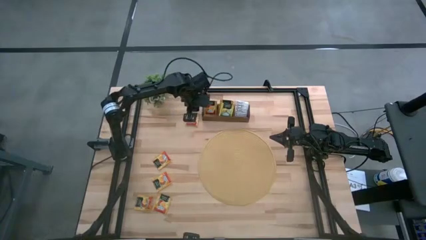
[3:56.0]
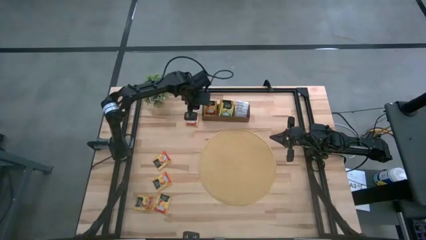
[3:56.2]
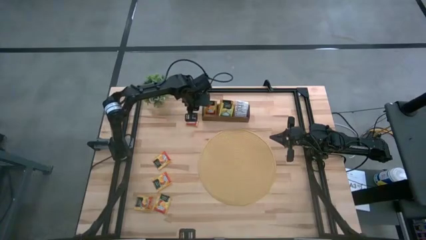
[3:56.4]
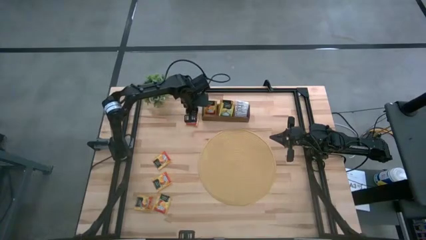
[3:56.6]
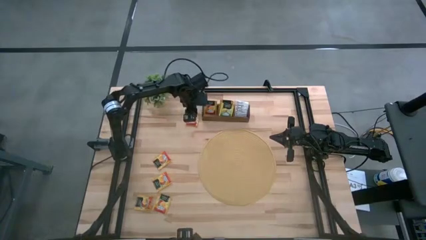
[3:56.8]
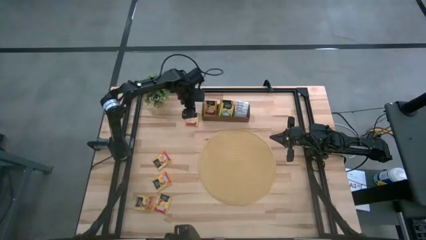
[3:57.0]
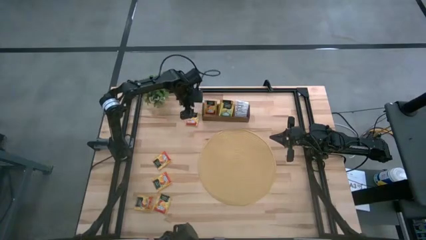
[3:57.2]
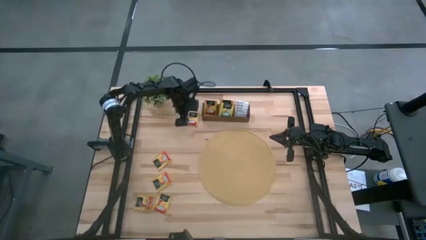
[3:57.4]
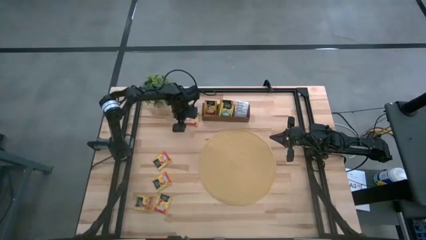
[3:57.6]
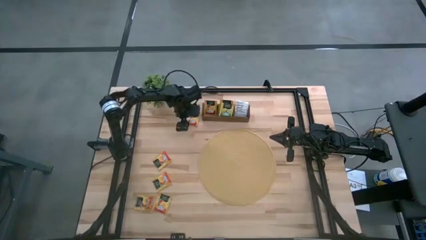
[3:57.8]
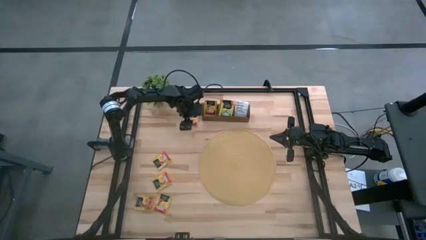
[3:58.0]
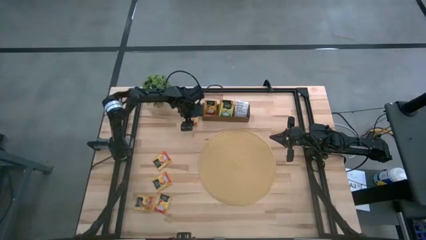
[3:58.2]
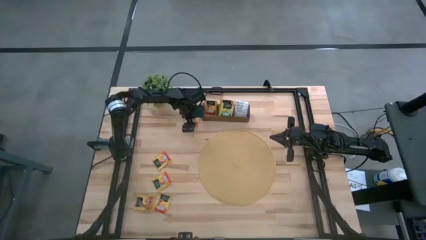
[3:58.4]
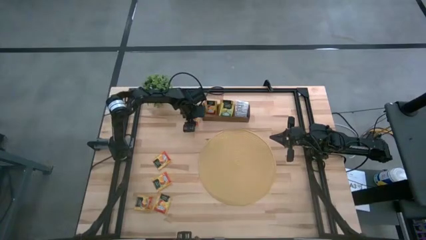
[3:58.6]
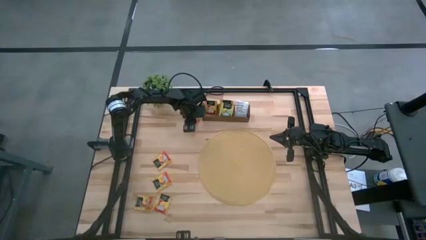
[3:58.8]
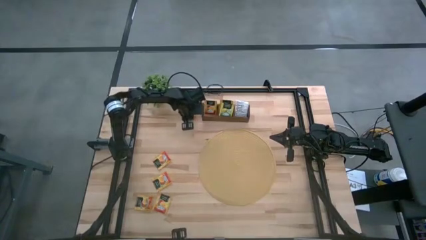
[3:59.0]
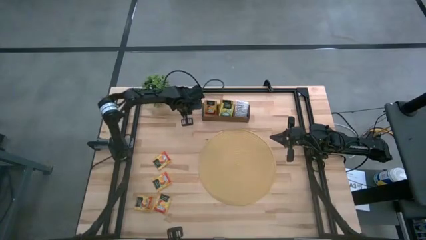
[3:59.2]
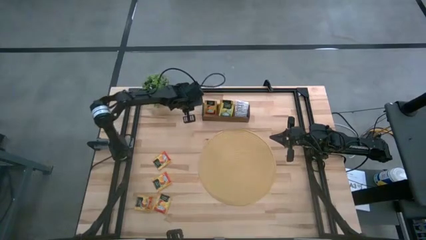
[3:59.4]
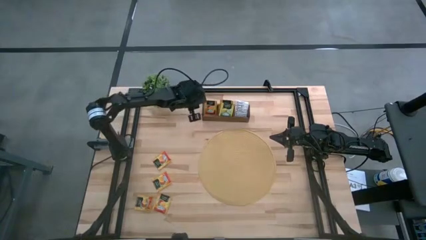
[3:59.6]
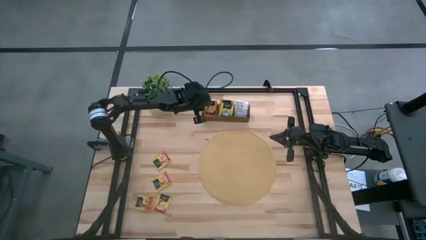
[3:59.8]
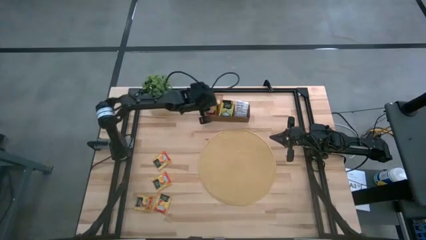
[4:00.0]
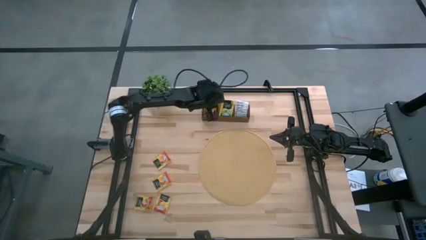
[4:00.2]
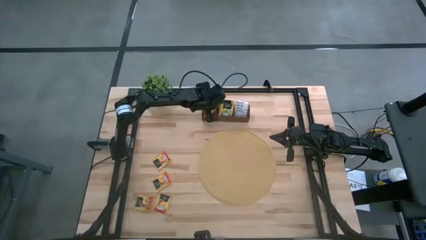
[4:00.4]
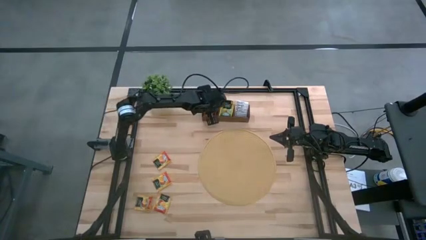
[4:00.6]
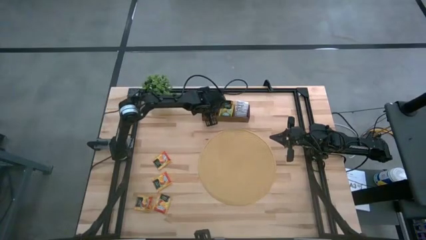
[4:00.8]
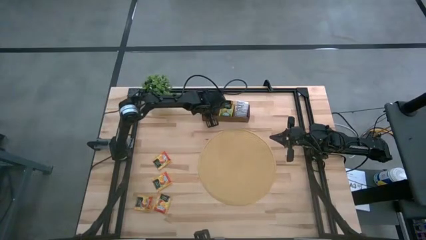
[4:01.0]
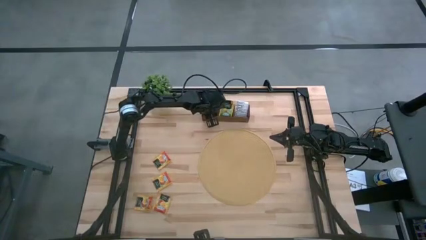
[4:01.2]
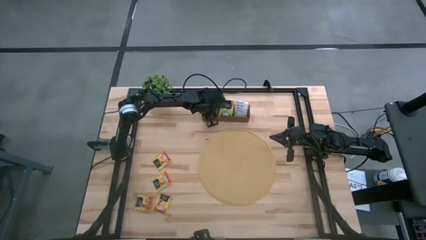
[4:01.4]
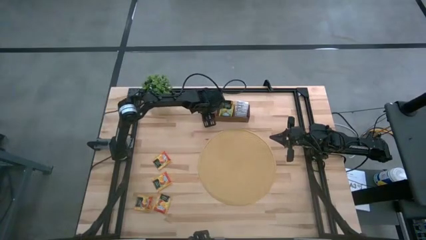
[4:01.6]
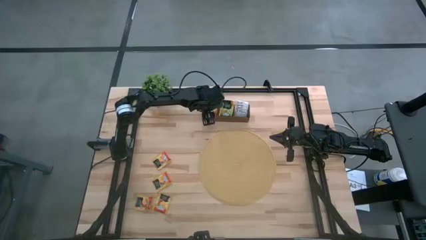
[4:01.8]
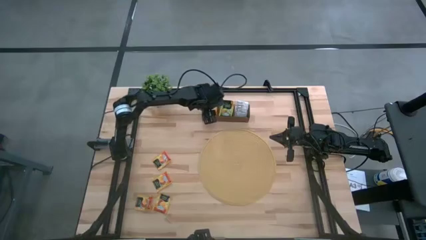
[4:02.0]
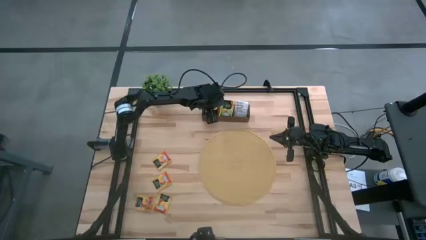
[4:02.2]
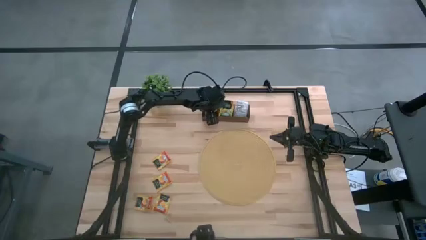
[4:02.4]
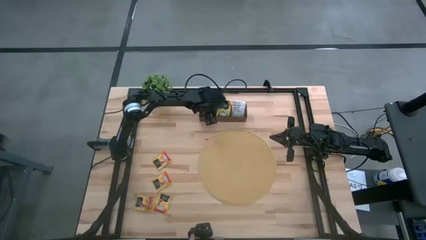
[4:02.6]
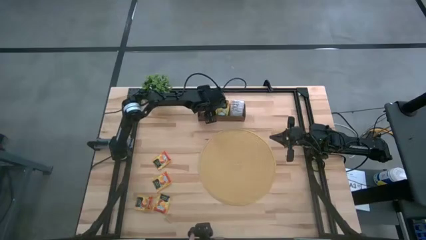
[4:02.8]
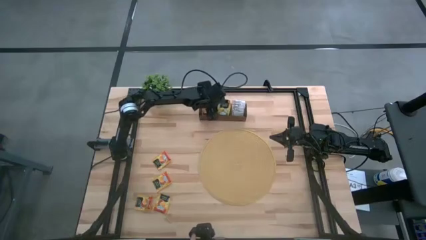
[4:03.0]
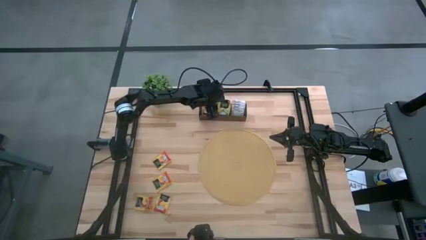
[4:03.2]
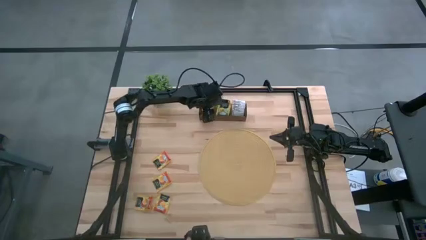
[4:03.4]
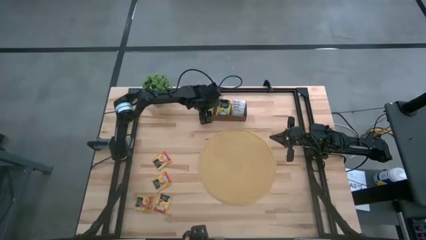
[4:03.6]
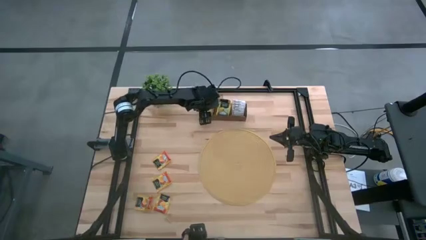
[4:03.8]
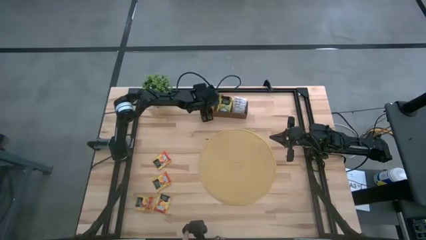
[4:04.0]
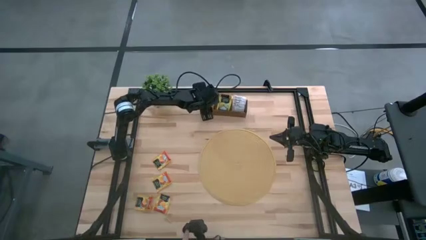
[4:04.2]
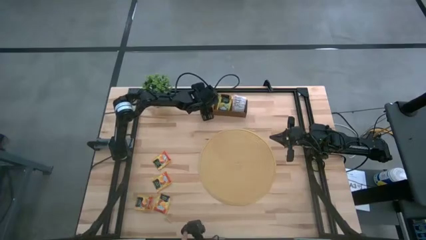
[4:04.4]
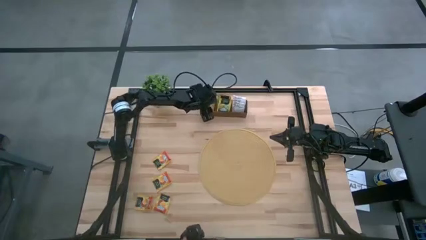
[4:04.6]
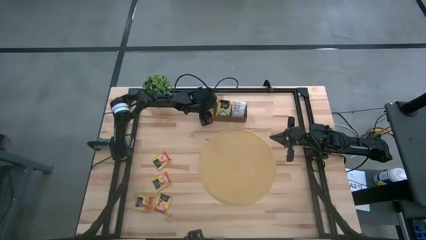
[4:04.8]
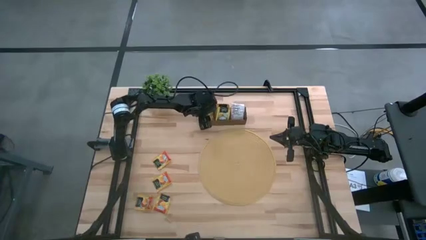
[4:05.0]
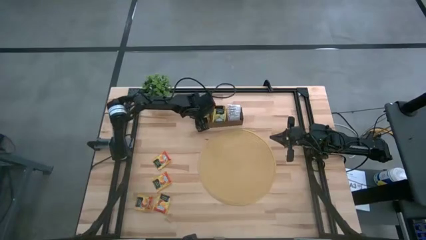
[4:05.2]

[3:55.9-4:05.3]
Task: Pick & Place Tea
Put the orange tea bag into the left section of the wooden organizer

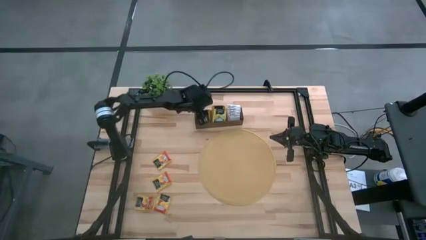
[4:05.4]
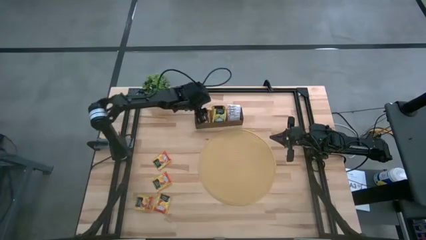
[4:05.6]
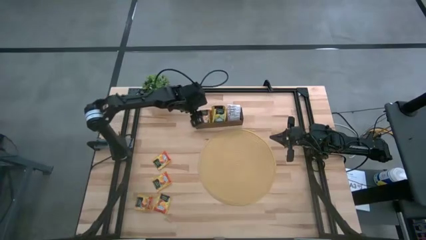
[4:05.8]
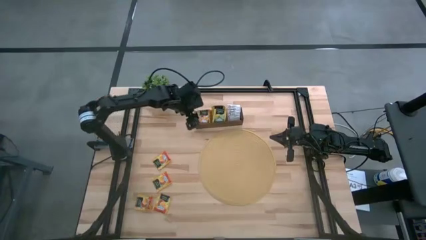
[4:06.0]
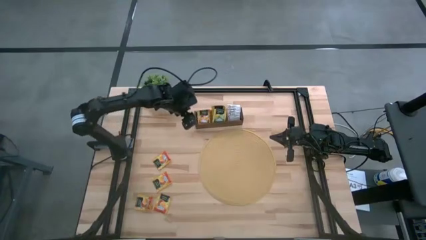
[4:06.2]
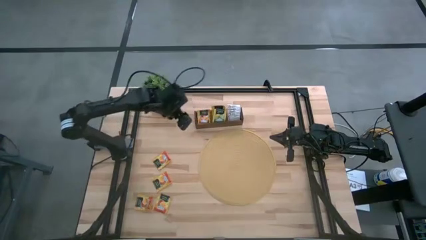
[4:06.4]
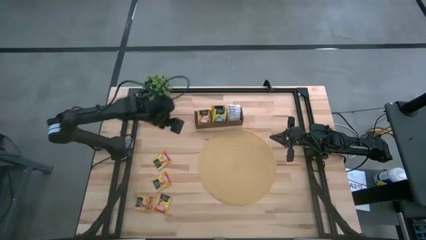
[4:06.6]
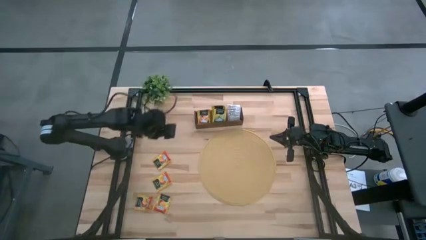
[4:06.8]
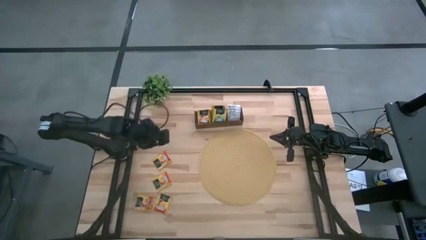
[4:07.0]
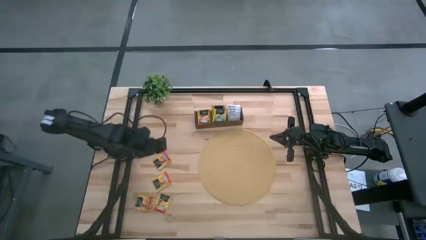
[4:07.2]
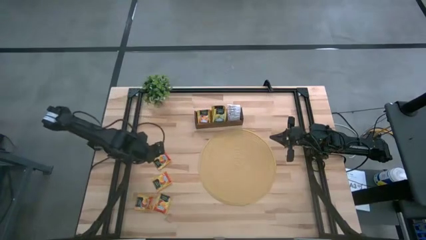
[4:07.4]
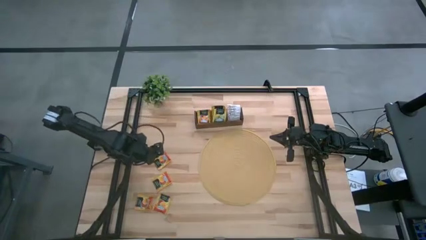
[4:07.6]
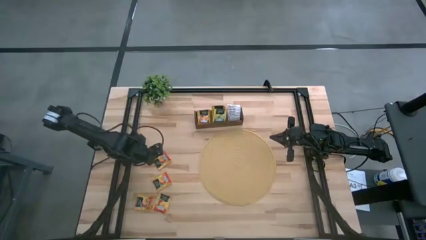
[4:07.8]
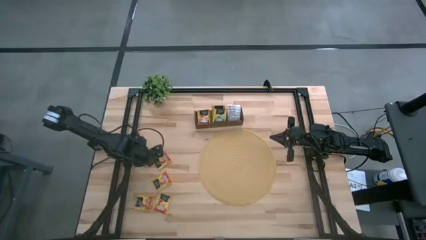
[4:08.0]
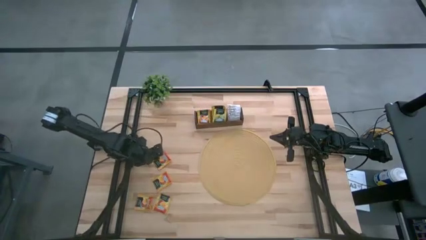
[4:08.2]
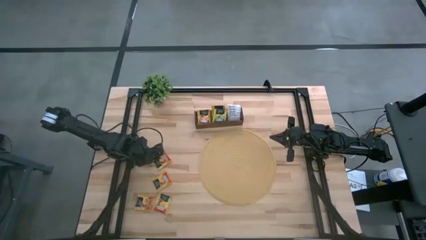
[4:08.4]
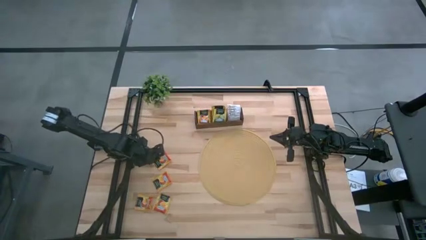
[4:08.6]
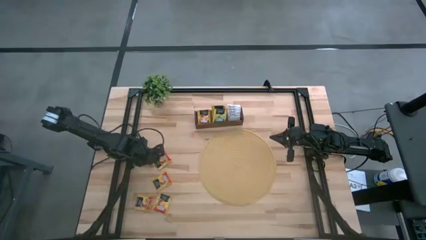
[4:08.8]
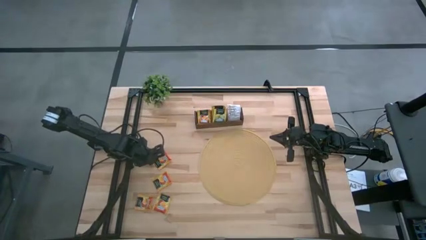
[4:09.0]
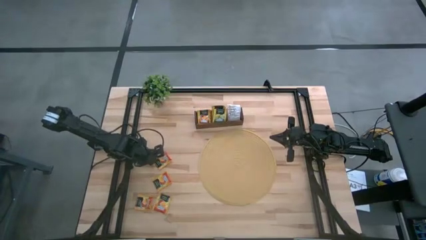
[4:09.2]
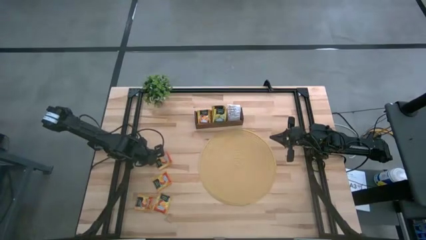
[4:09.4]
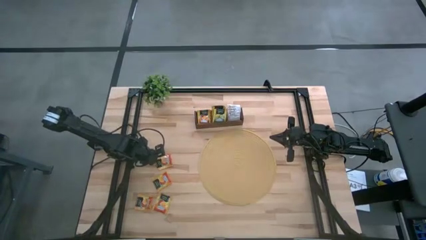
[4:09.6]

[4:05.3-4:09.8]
Put the orange tea bag into the left section of the wooden organizer
